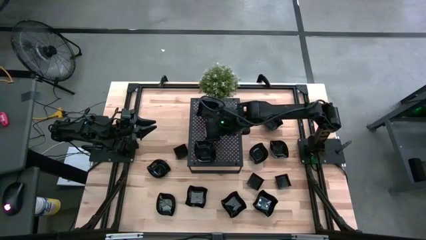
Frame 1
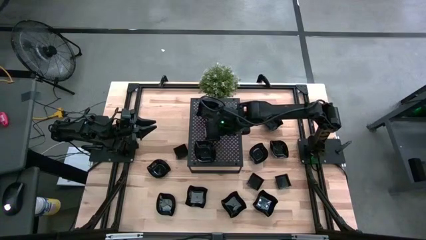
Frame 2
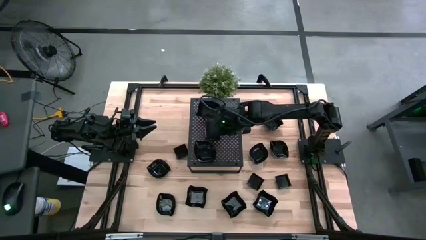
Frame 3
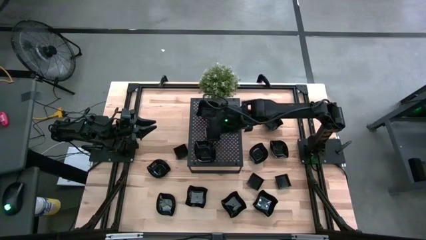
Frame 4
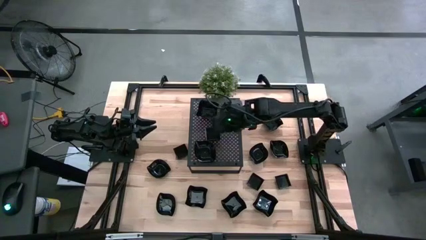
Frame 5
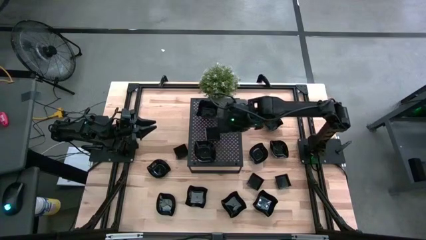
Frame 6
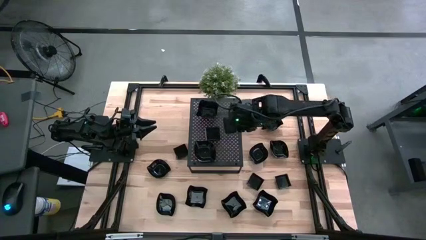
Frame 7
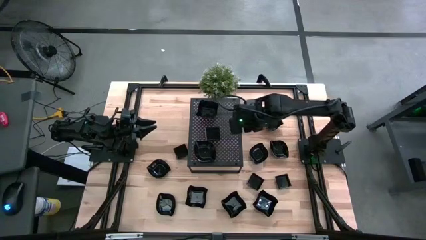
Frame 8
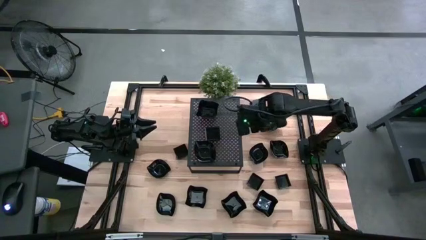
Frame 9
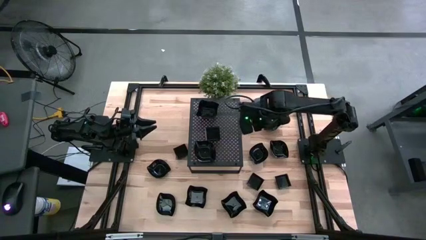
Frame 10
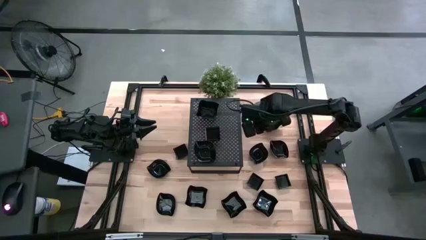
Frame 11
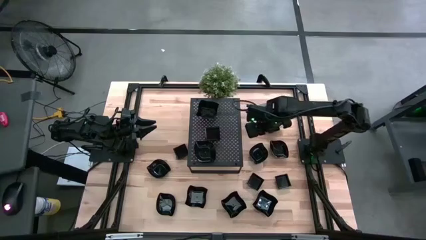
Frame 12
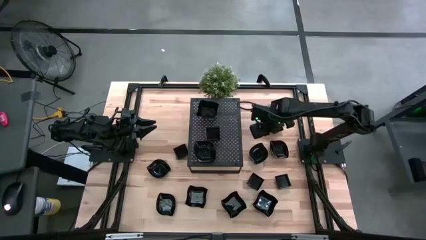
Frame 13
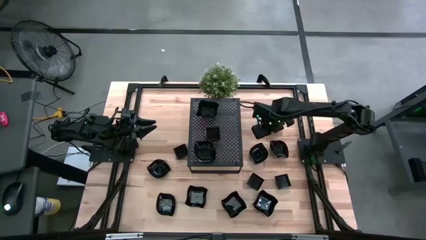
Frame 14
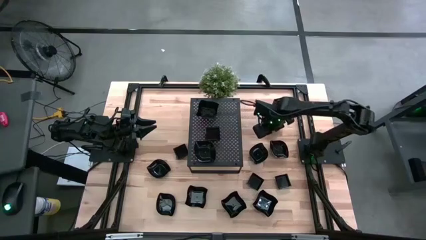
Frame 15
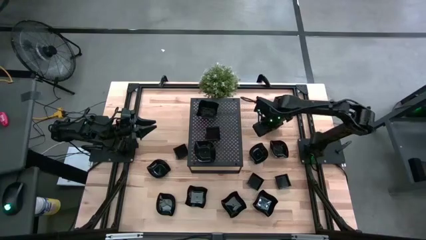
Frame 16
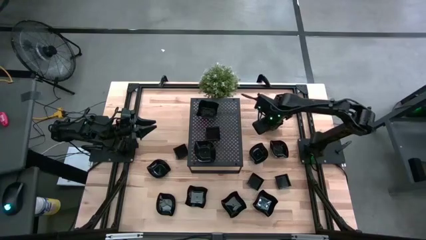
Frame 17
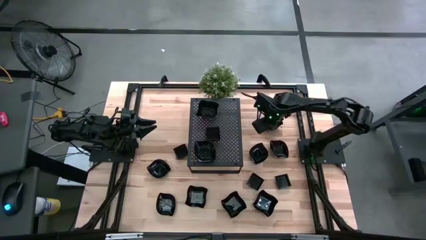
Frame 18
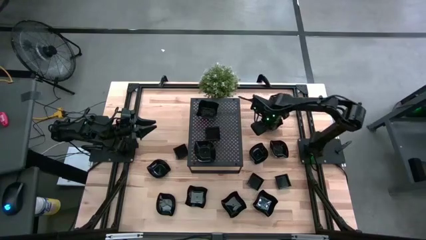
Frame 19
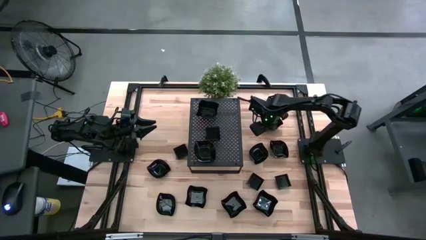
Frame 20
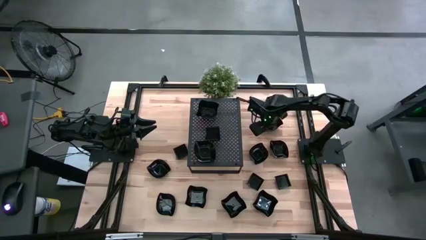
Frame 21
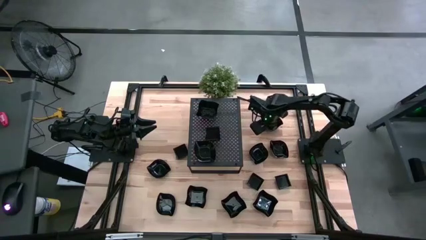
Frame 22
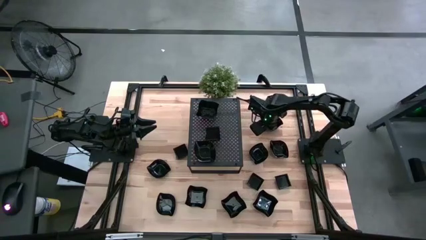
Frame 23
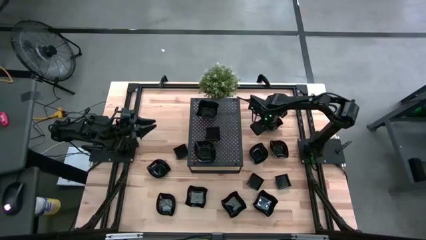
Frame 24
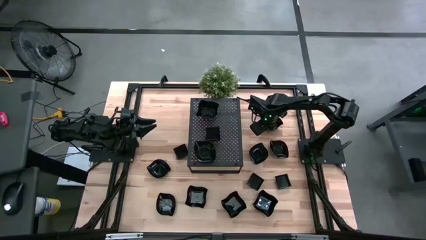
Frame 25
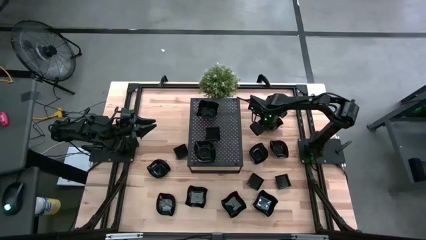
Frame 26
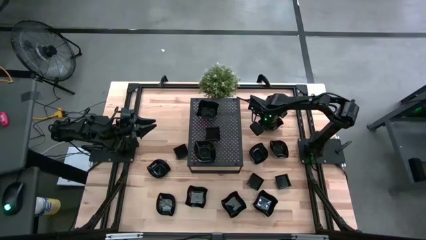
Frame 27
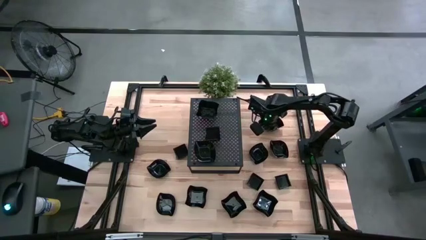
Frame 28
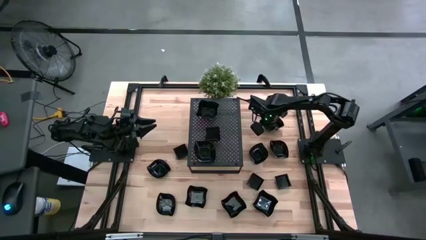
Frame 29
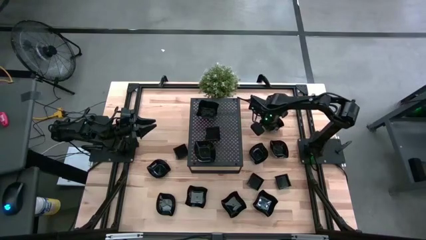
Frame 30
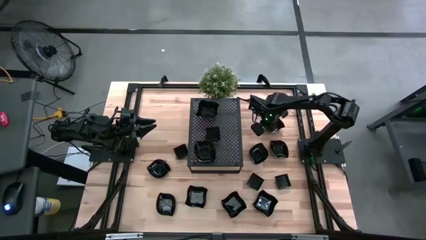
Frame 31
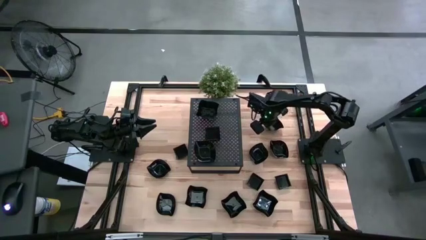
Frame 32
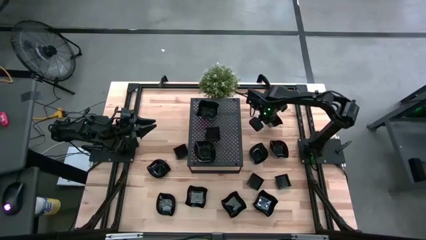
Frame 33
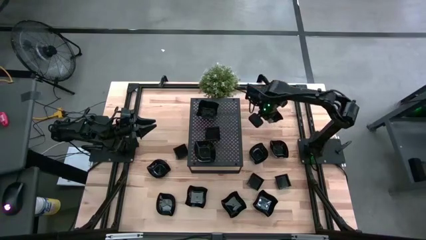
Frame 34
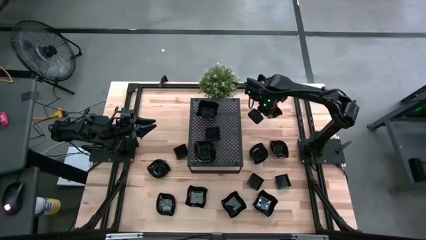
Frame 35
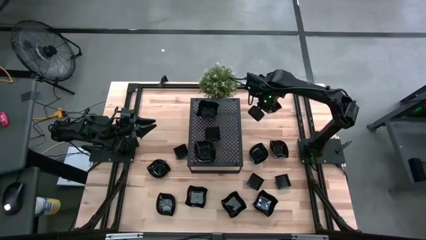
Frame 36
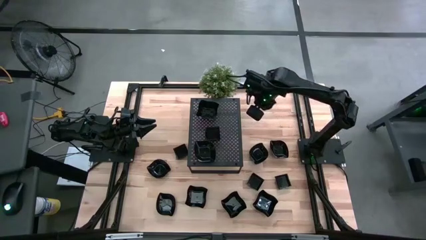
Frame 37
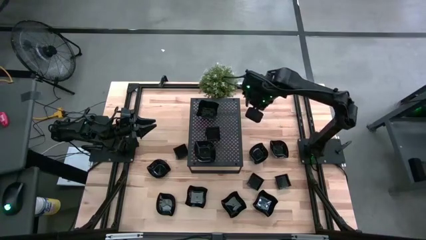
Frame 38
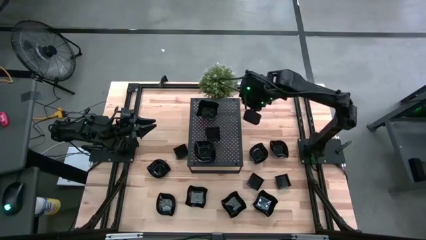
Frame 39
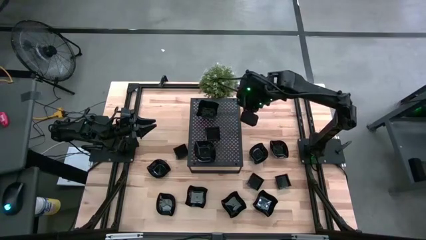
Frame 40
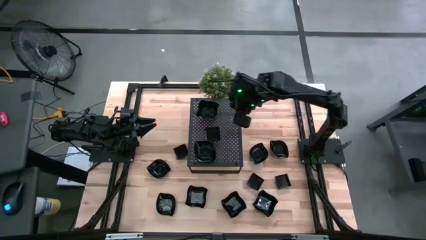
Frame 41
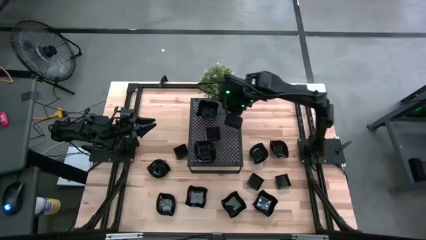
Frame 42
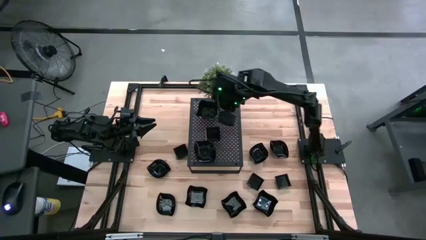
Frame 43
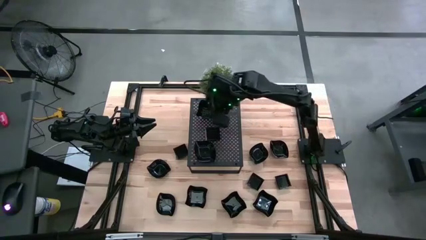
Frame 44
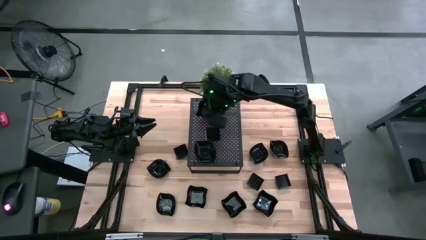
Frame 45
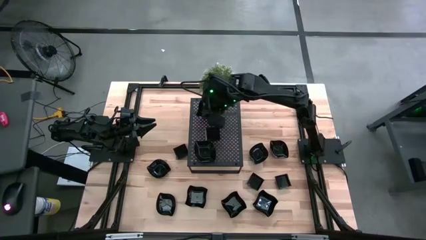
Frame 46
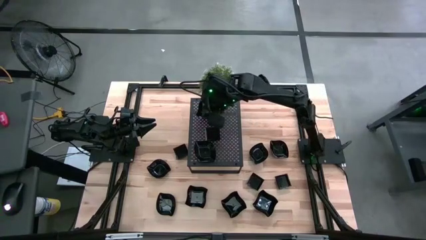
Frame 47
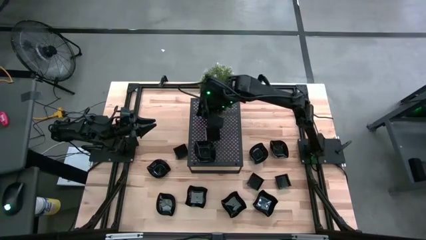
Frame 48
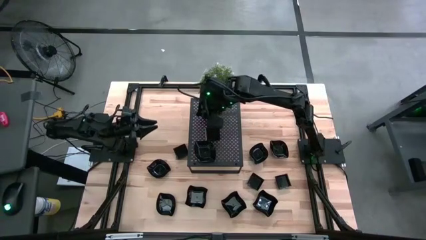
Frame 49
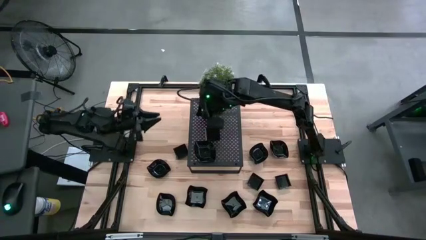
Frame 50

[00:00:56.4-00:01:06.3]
Task: Pick & Place Mini shaped plates
Stack the distorted square plate on top of the distorted square plate on the shelf

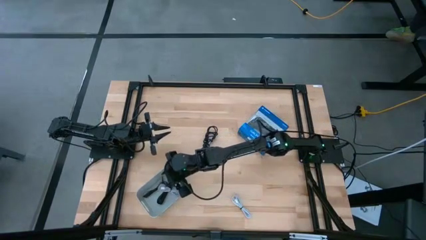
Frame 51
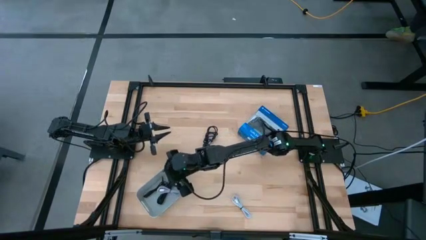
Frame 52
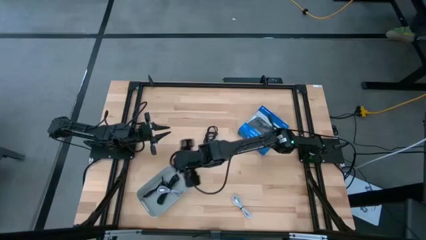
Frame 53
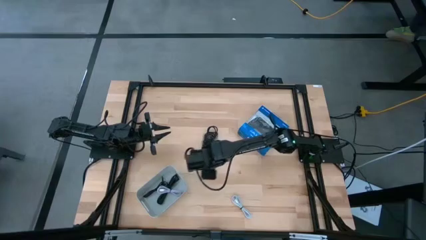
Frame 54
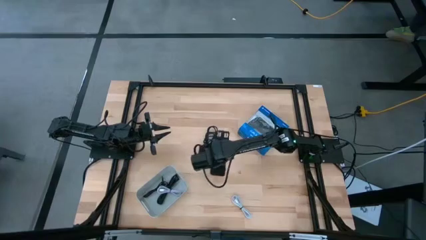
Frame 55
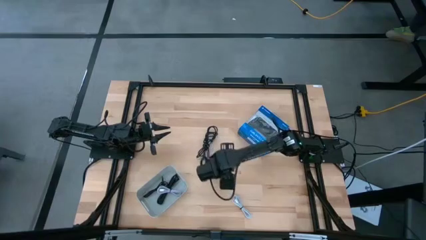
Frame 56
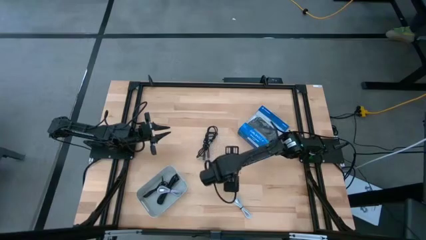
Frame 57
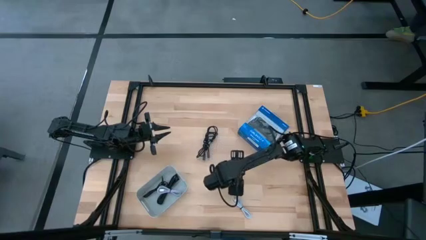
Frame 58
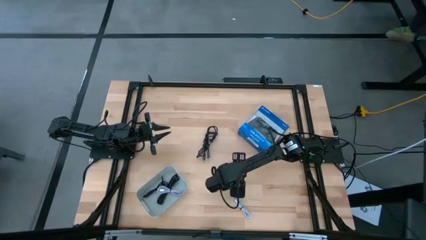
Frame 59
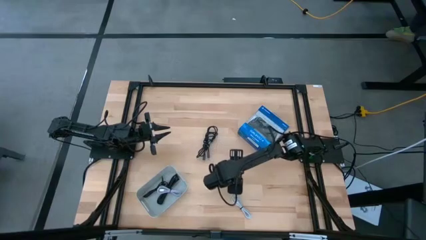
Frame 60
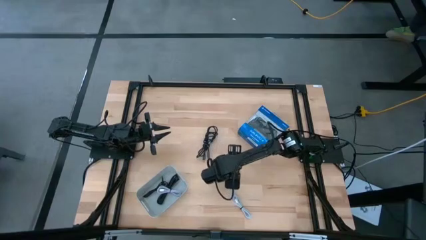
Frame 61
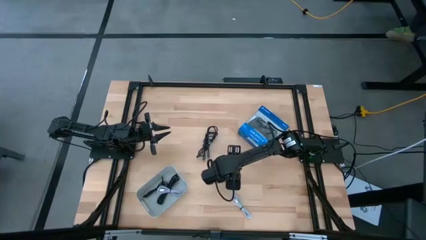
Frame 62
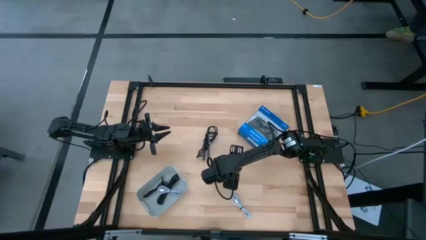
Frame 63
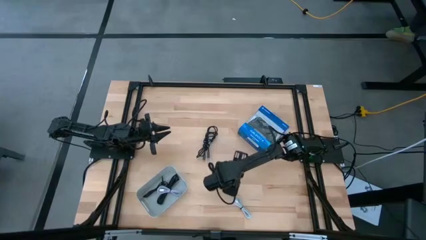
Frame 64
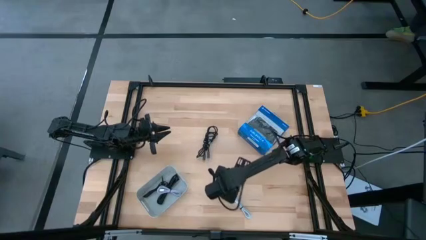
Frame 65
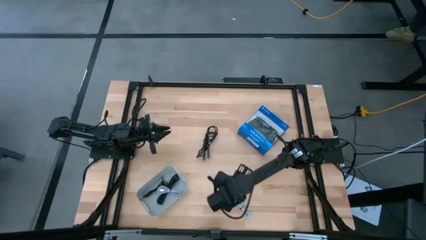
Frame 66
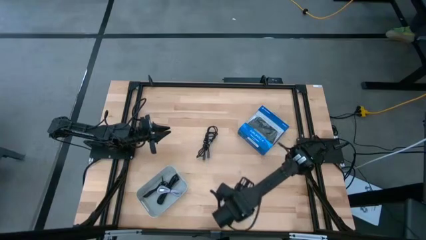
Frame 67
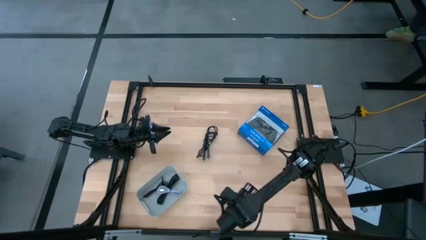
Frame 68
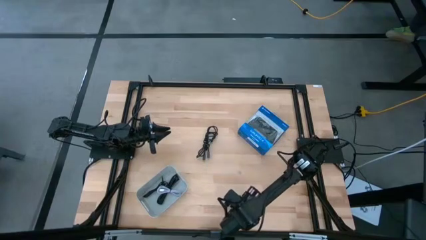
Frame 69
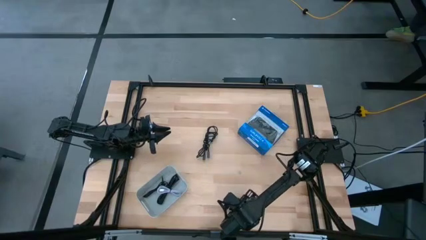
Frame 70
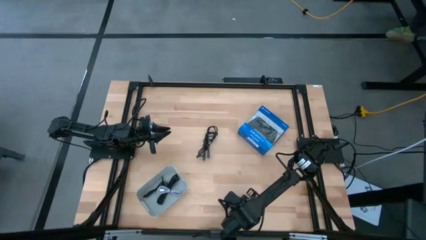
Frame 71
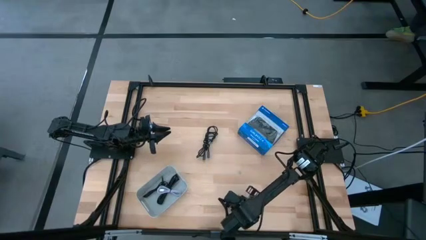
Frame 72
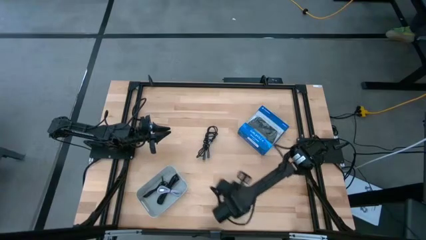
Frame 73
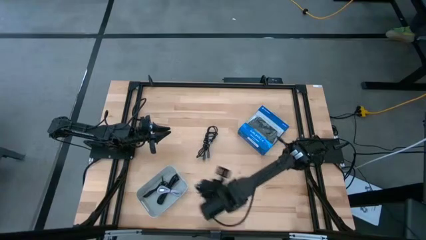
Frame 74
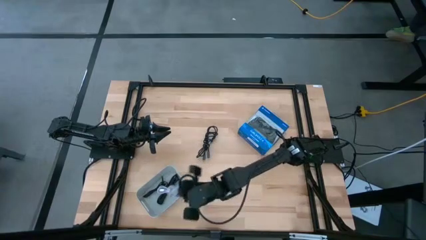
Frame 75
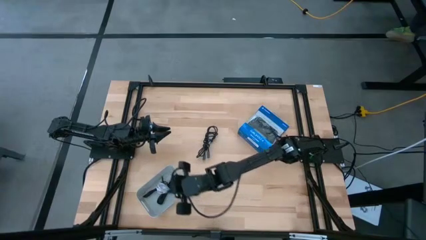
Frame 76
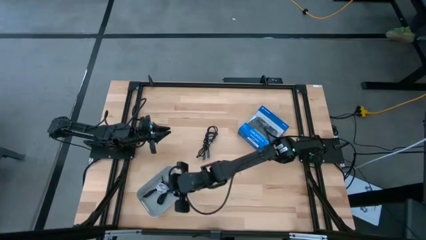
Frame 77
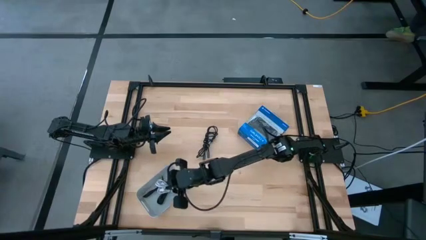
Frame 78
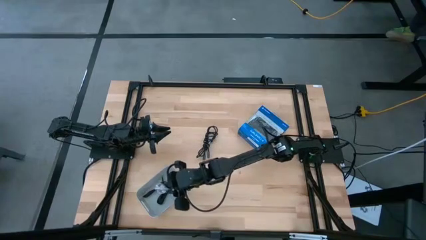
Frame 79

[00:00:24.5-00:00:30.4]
Task: Pick and place USB-C Cables
Put the white charger cable into the white bin
